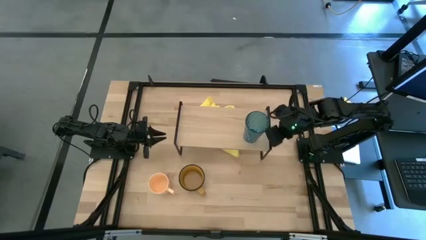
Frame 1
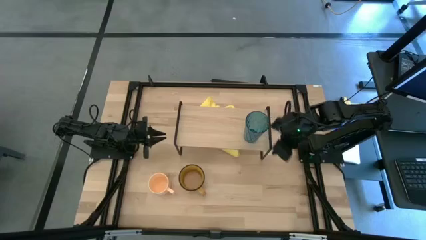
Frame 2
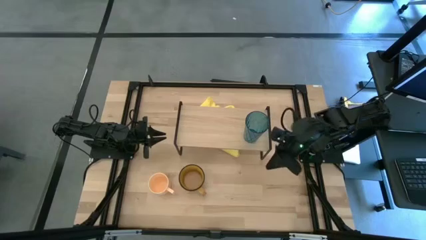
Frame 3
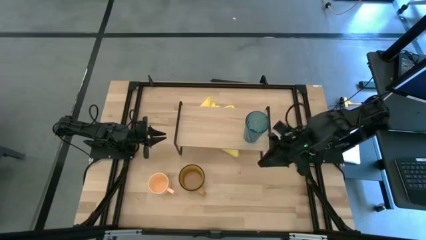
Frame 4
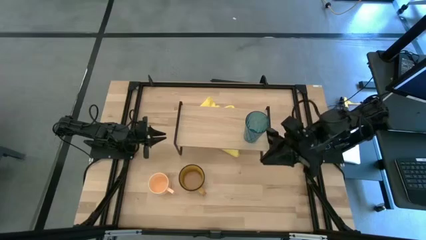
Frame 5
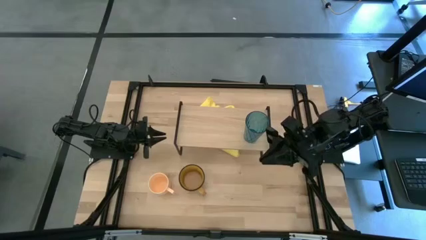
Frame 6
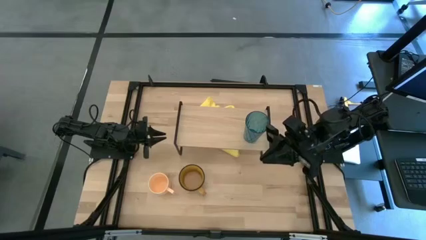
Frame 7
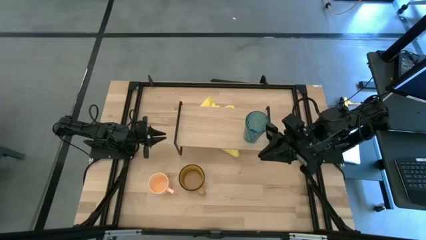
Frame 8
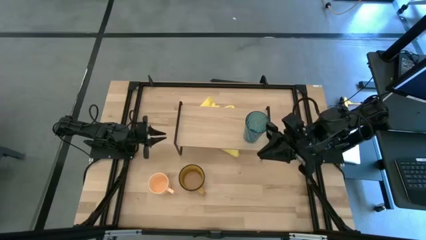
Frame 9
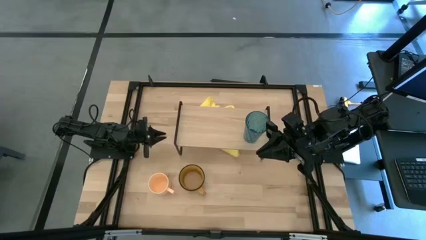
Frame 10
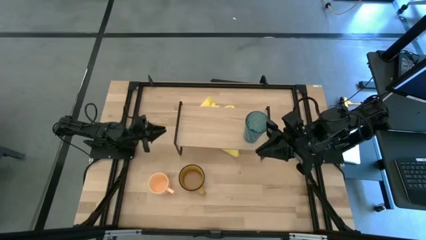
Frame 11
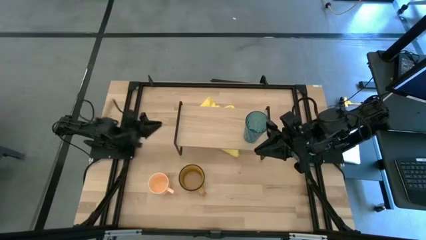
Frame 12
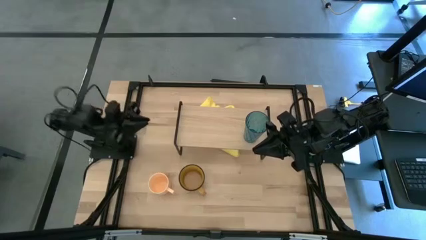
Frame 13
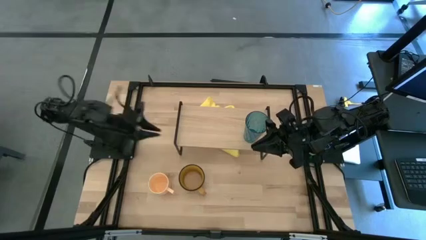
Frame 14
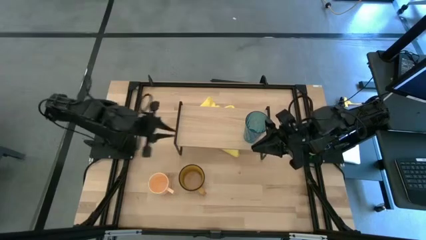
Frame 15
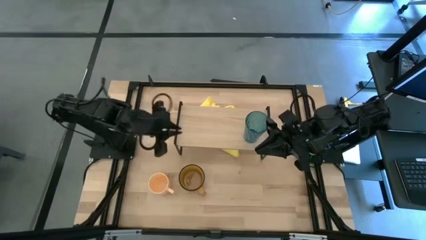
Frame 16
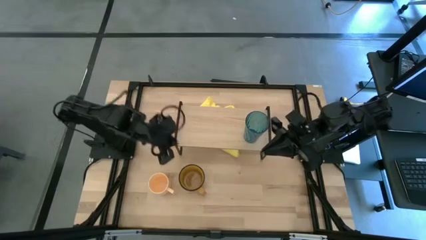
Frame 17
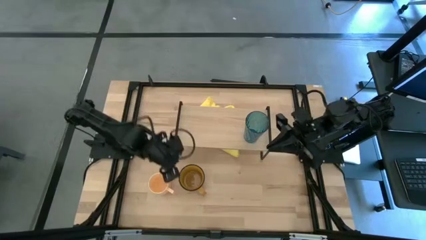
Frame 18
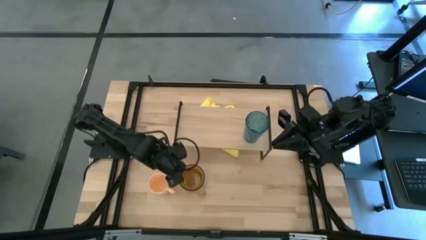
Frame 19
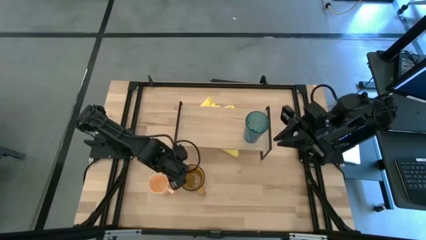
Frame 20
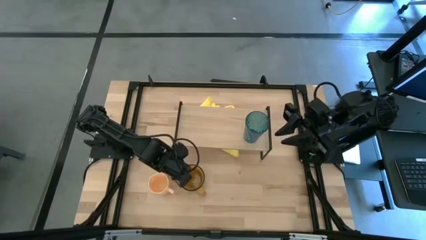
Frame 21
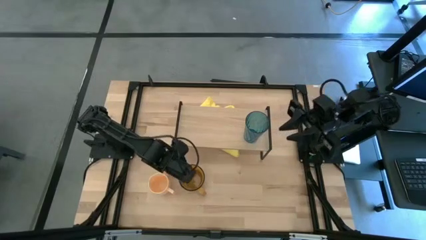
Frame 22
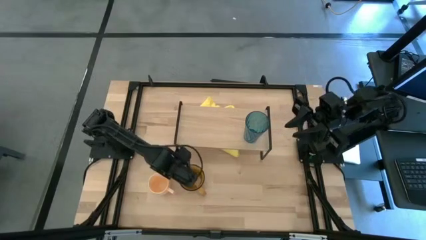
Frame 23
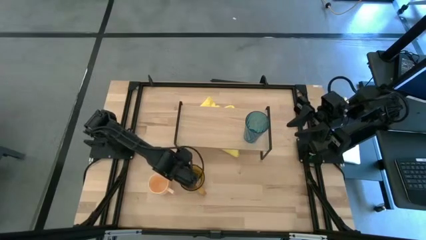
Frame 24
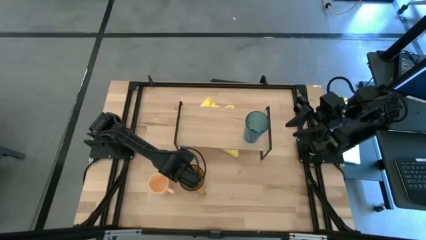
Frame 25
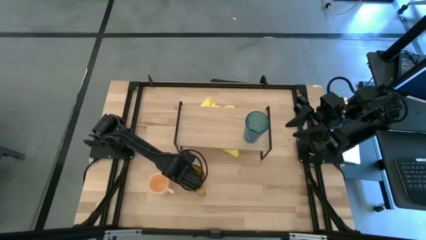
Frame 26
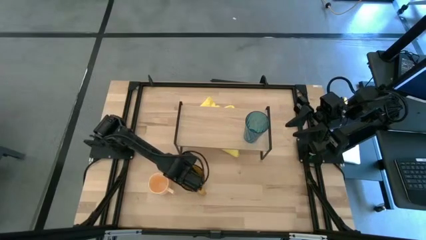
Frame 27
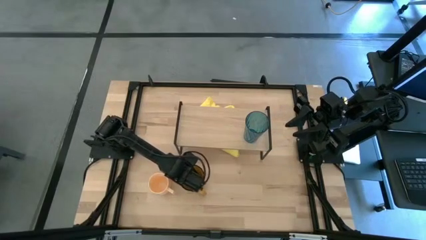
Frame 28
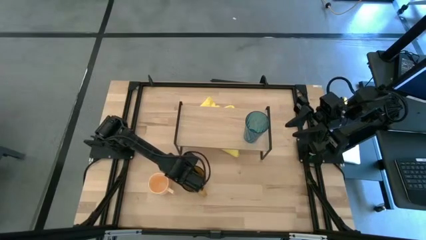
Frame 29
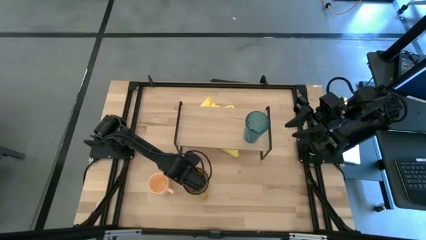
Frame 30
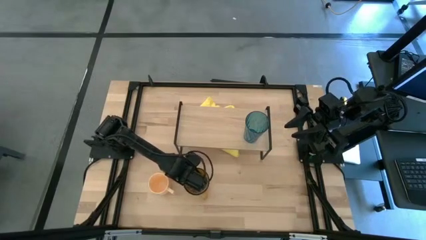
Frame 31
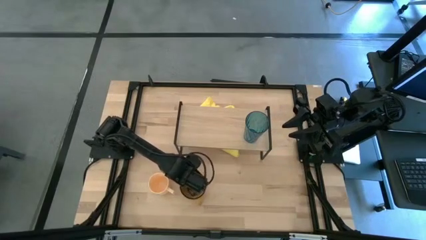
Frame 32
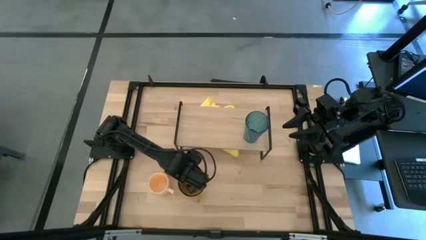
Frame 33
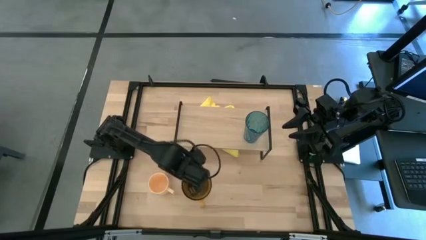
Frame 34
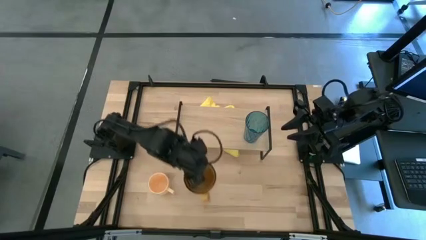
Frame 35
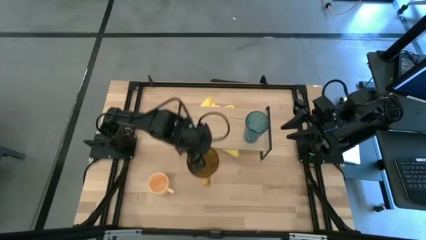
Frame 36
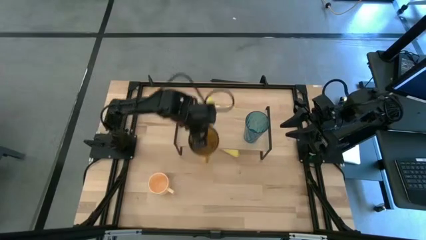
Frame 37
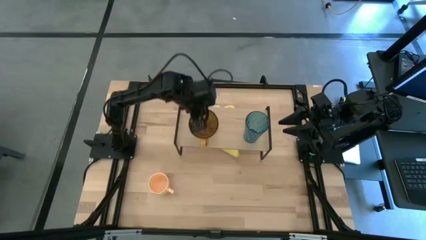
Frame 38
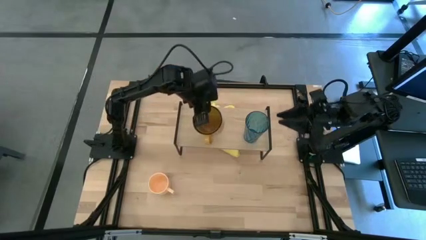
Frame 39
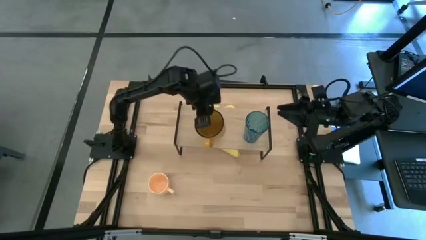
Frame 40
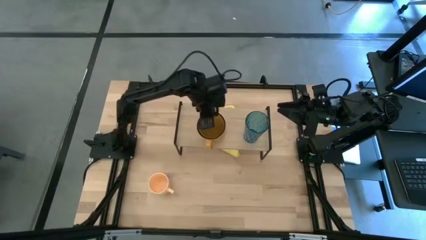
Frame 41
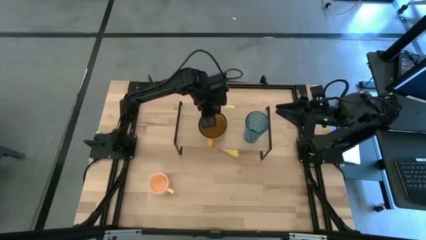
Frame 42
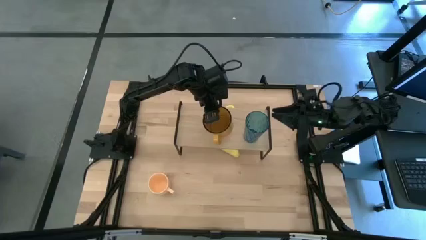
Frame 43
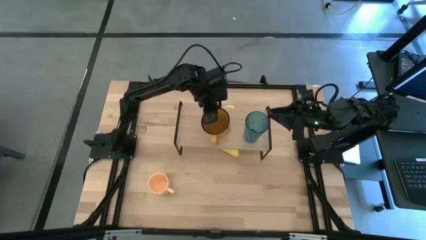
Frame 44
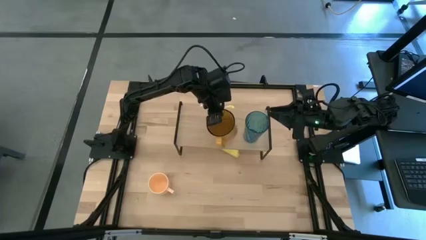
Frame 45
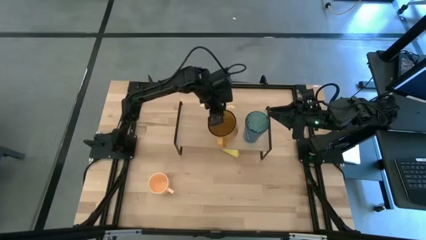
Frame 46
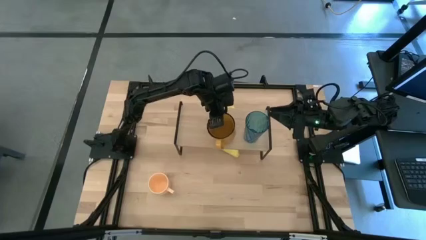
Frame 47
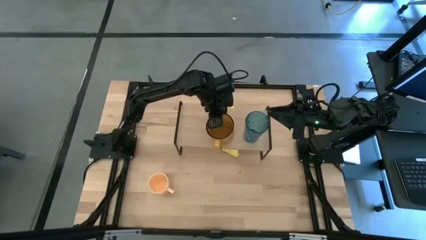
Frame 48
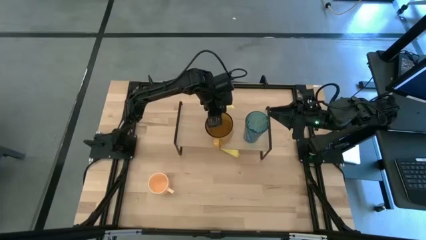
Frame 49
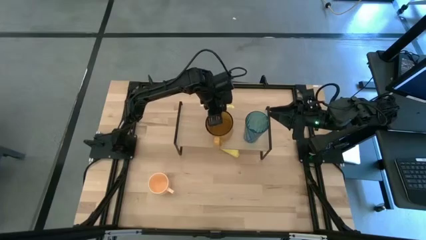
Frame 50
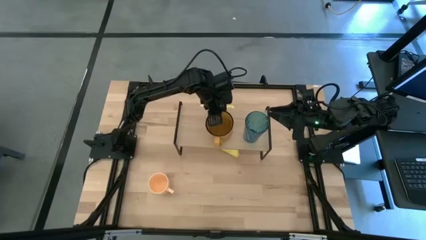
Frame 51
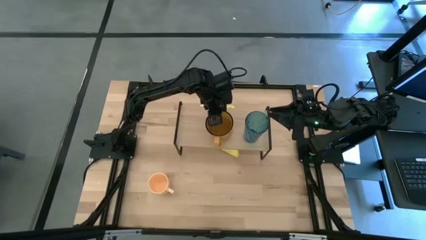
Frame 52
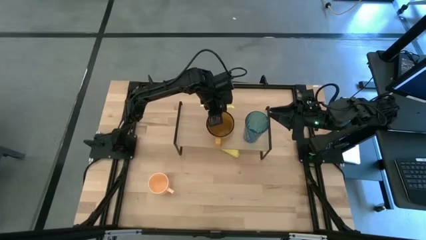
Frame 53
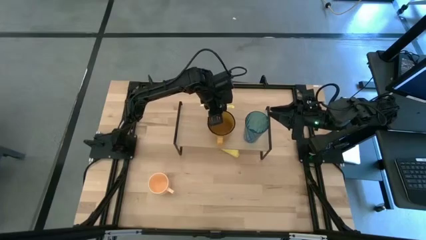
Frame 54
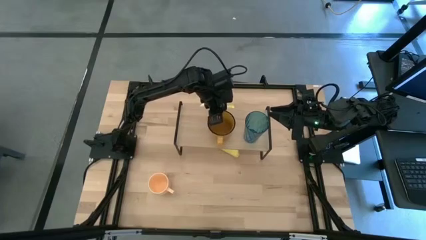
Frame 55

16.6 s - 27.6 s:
Task: Stack small to large cups/mugs on shelf
Put the yellow mug on the shelf

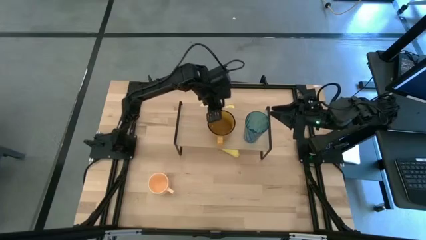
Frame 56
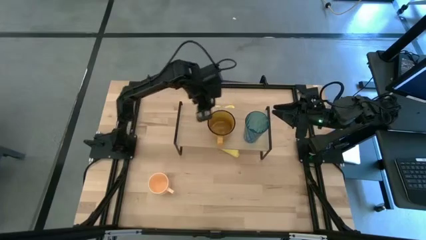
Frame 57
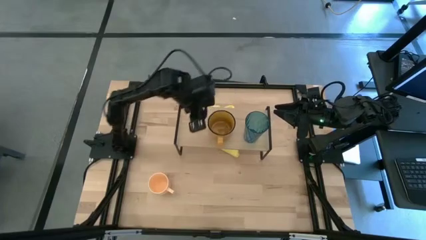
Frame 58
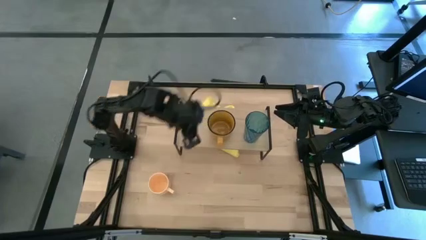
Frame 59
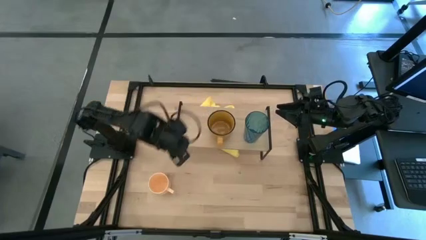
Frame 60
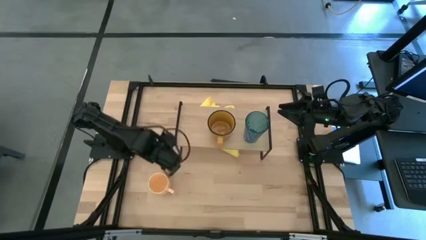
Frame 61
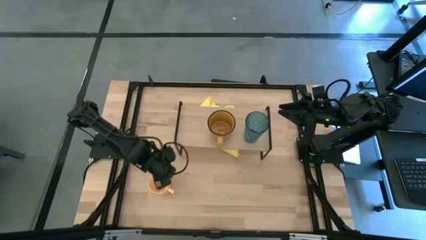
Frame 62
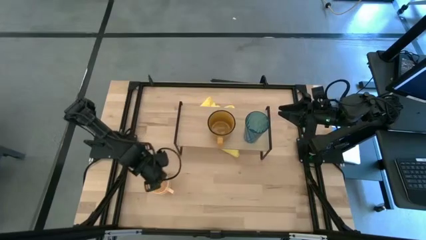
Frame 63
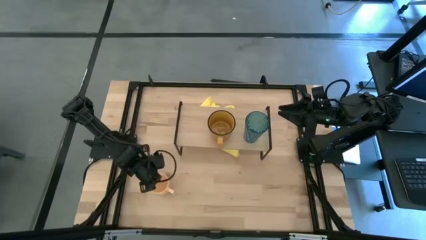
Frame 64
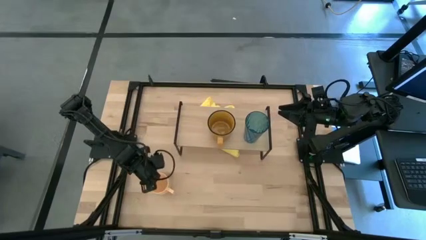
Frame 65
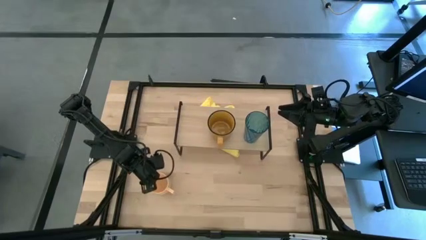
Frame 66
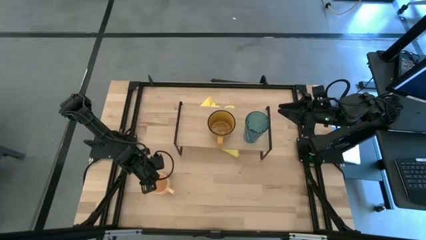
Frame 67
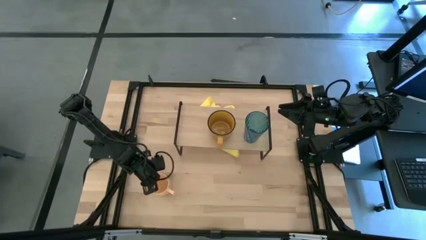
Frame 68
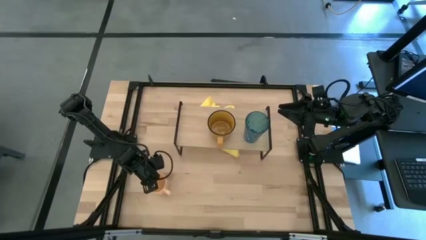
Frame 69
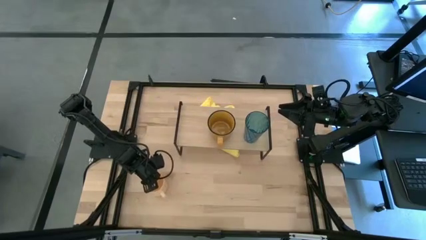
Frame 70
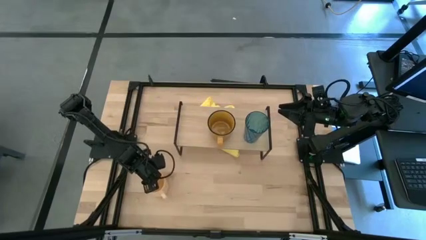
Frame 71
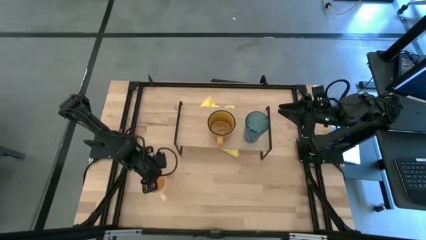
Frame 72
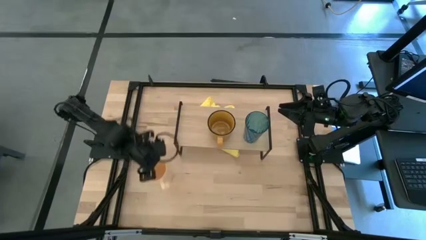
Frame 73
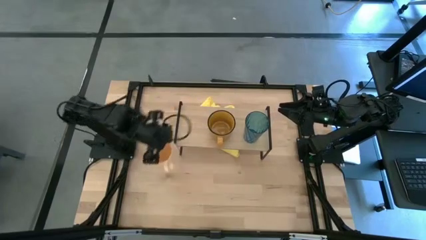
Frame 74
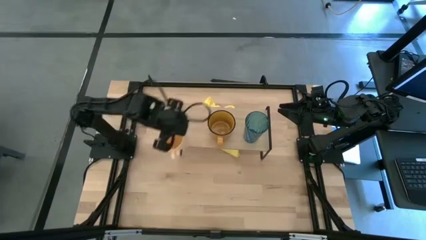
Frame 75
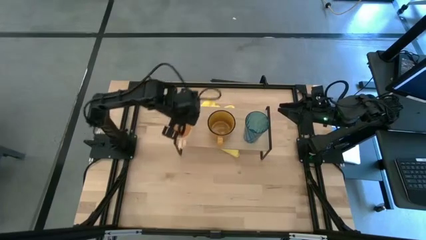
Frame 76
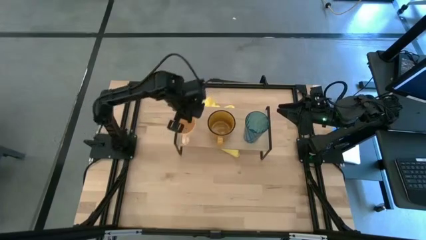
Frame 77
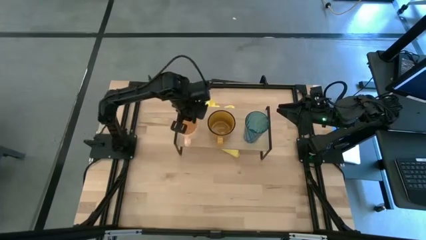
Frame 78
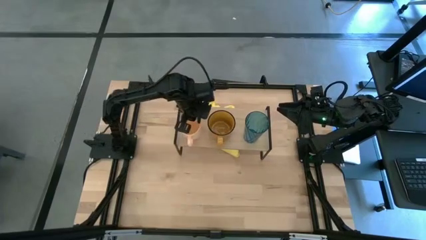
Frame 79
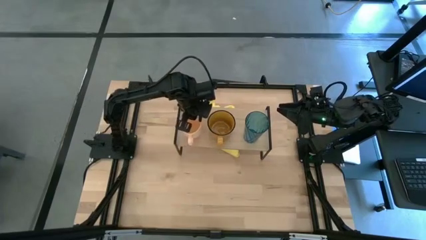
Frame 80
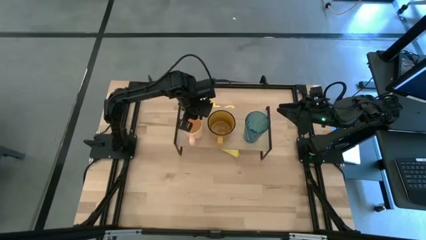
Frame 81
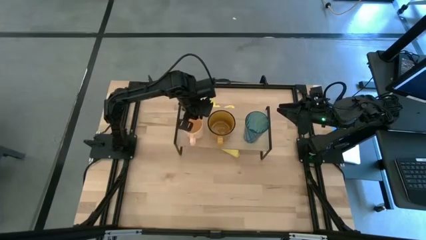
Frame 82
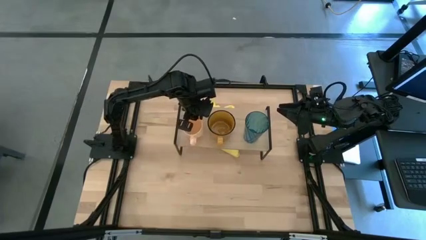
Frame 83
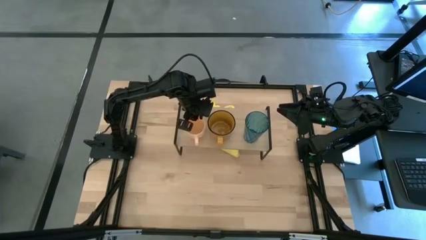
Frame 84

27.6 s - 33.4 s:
Put the light yellow mug on the shelf
